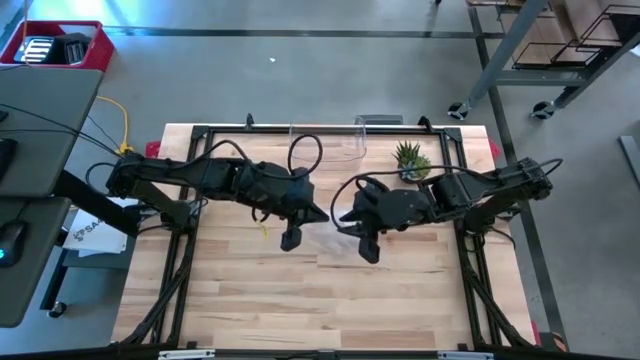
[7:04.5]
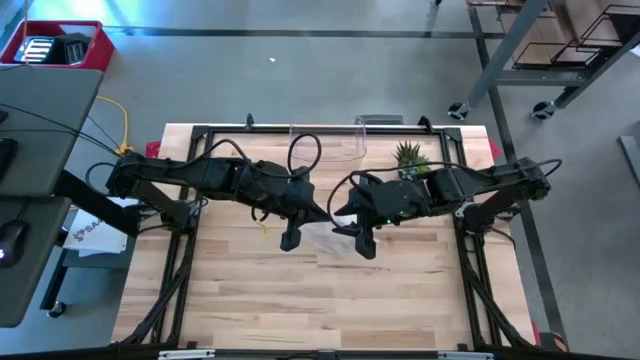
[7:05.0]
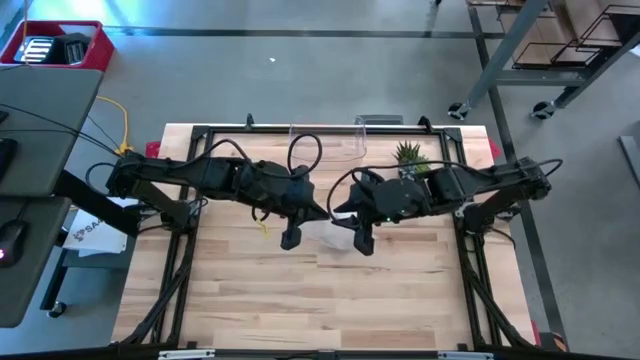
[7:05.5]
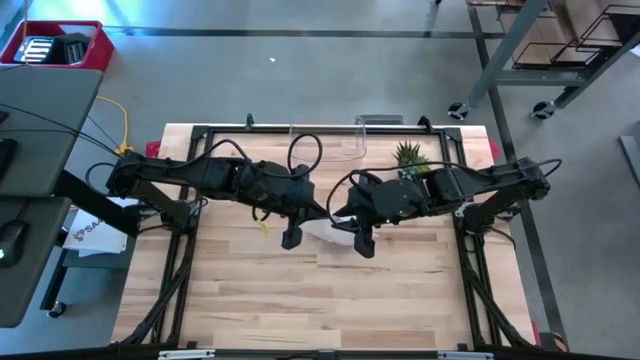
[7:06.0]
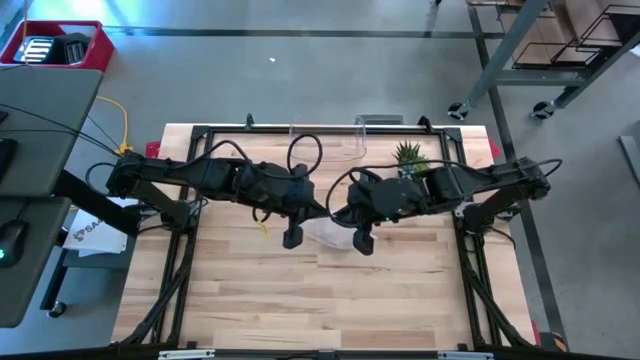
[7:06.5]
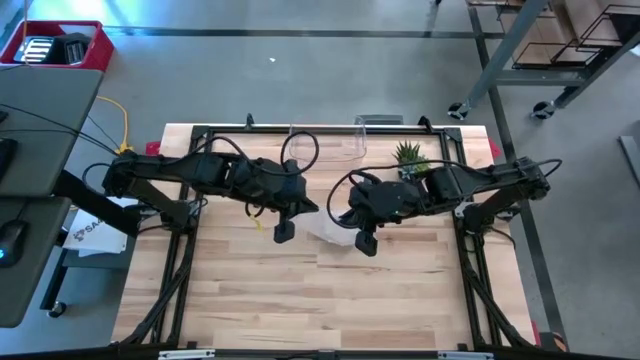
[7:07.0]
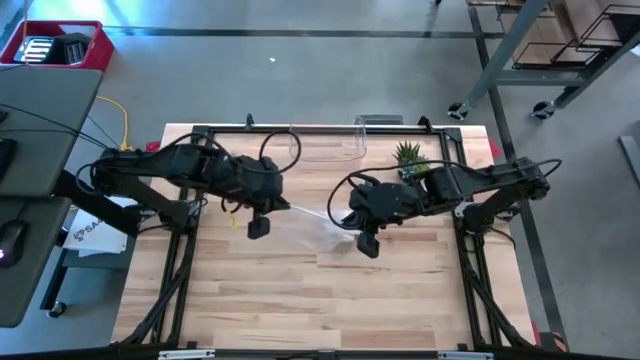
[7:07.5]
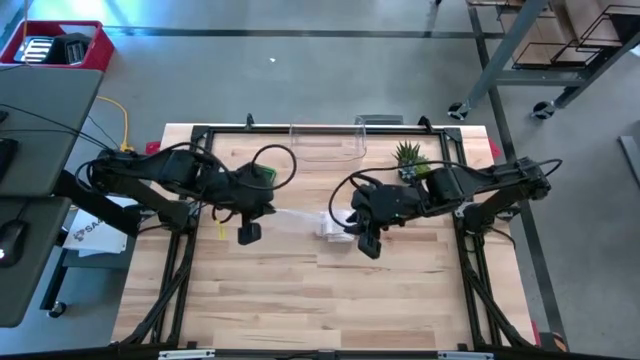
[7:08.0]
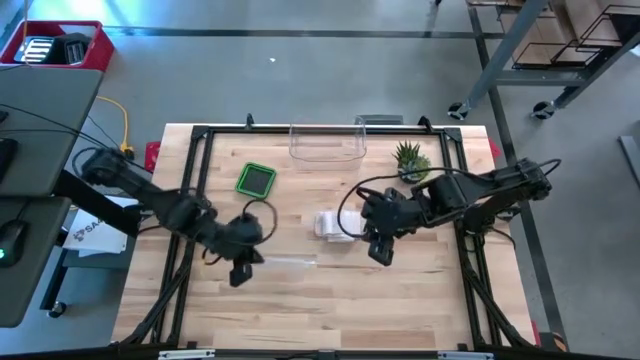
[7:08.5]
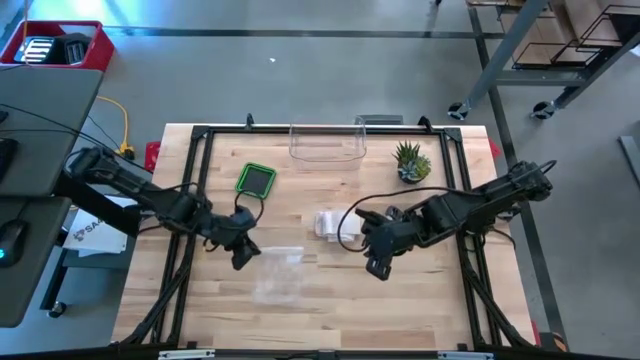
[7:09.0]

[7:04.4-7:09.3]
Task: Roll bandage
Open the transparent zip bag

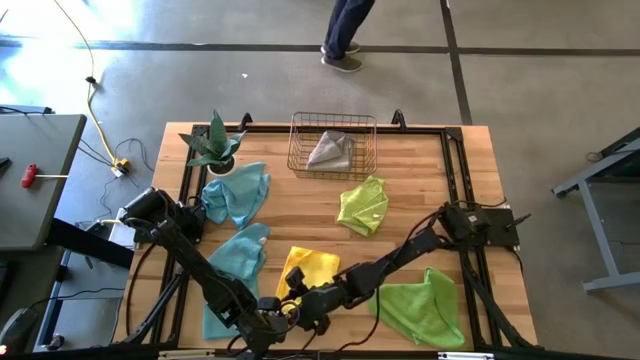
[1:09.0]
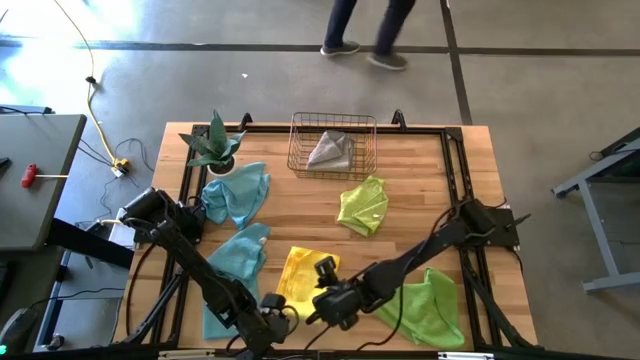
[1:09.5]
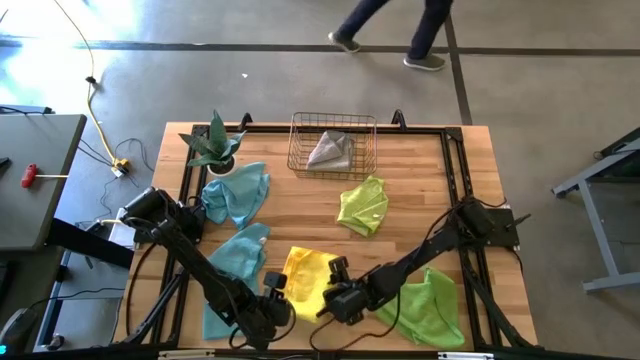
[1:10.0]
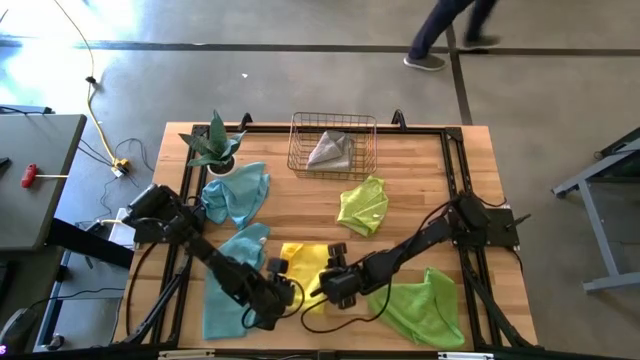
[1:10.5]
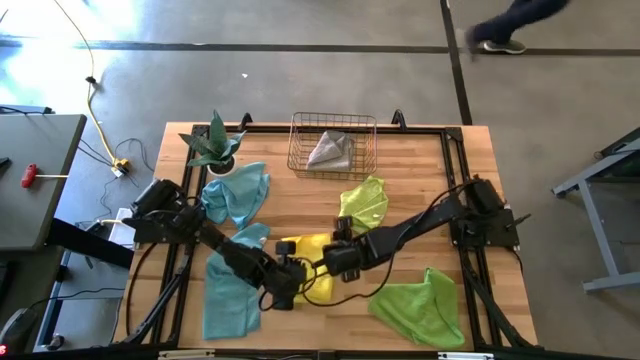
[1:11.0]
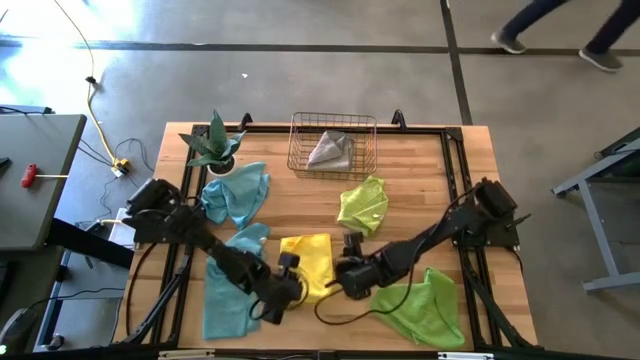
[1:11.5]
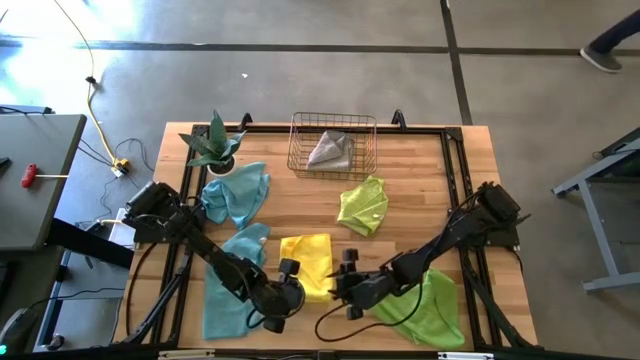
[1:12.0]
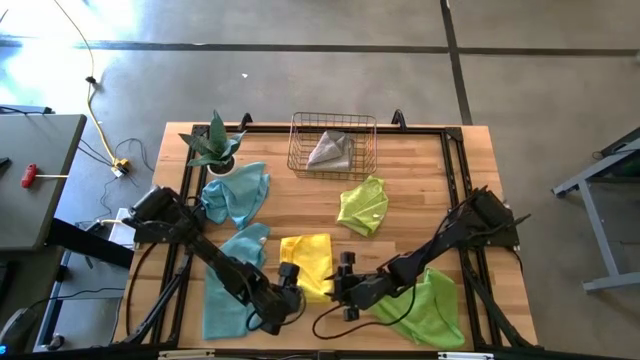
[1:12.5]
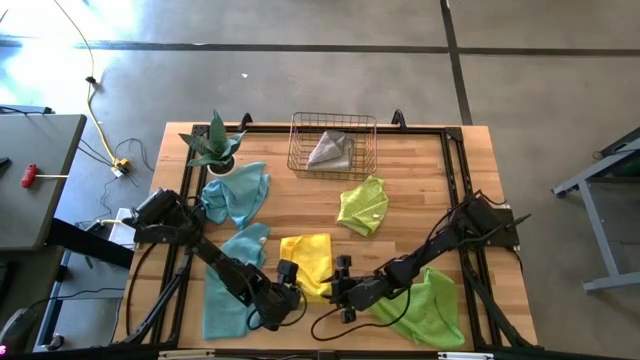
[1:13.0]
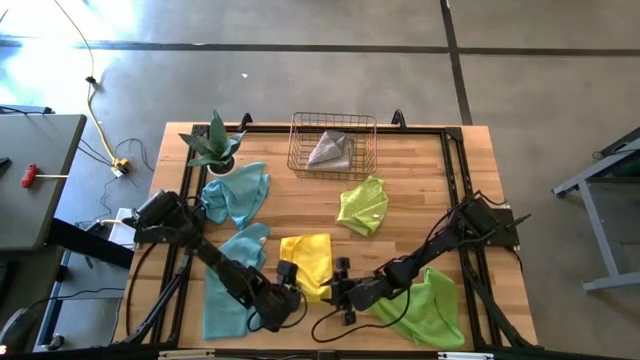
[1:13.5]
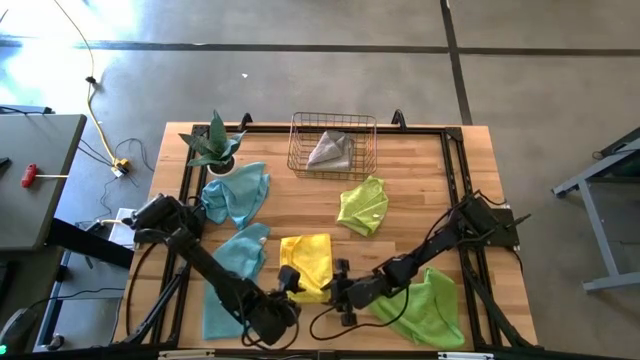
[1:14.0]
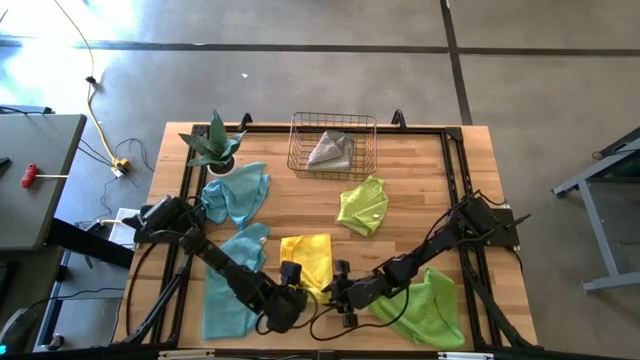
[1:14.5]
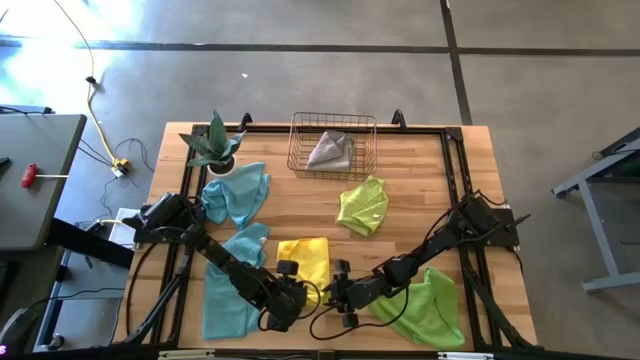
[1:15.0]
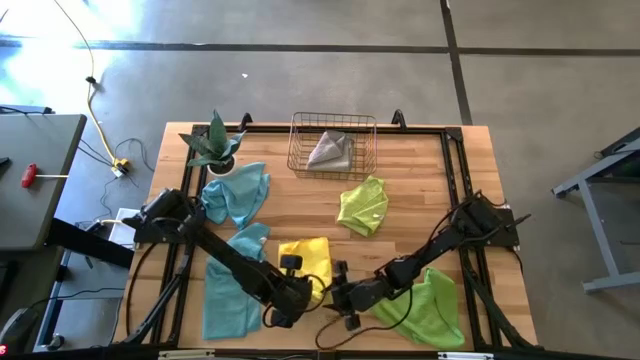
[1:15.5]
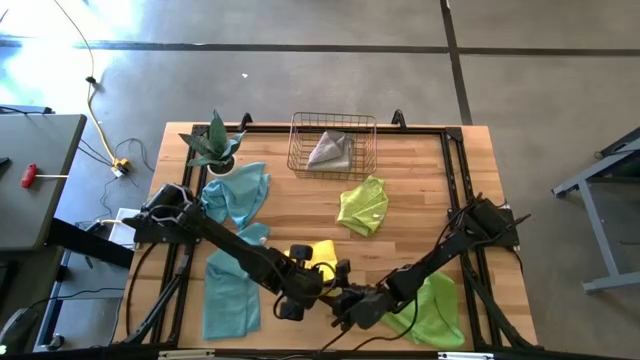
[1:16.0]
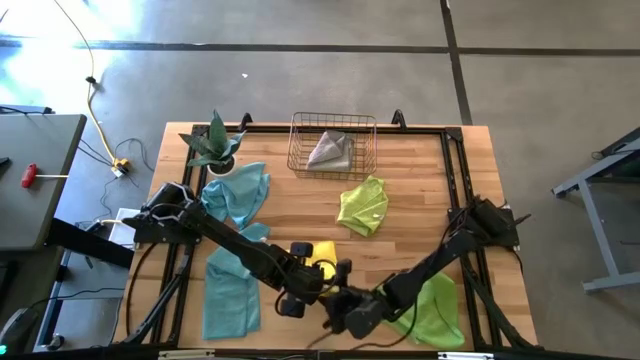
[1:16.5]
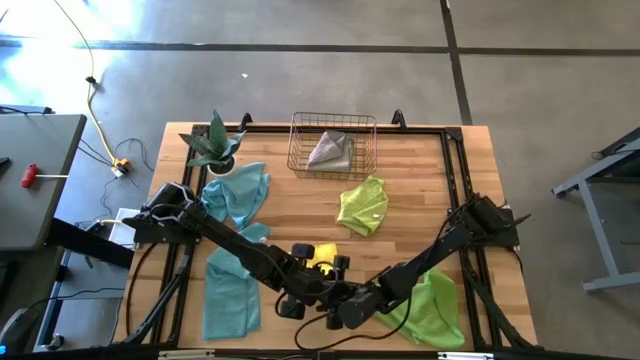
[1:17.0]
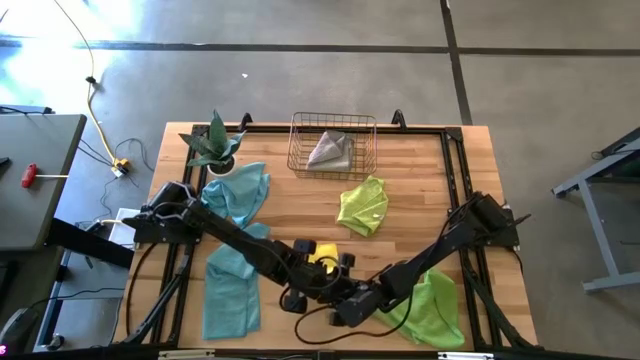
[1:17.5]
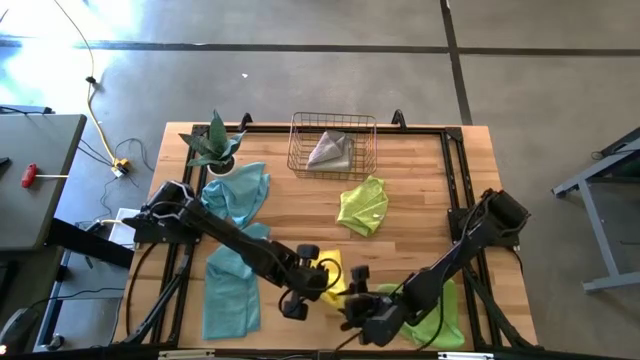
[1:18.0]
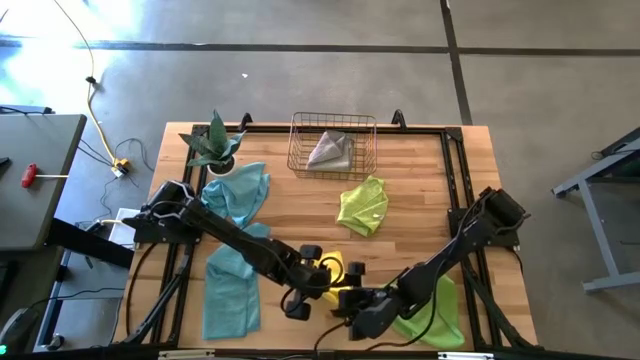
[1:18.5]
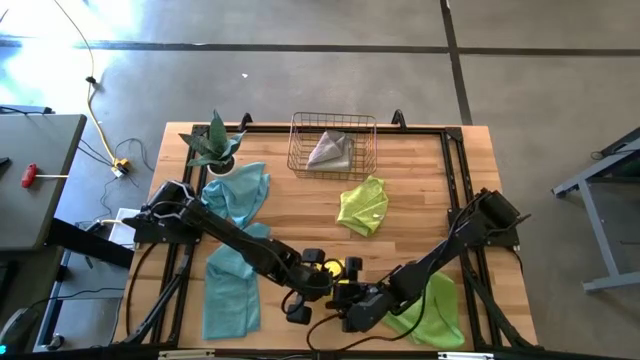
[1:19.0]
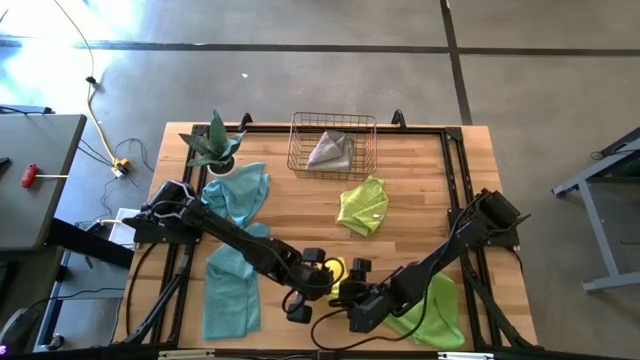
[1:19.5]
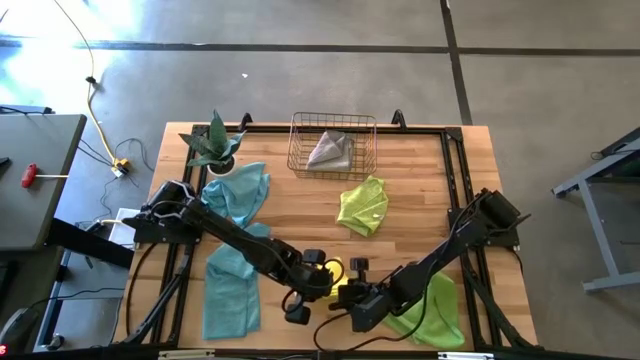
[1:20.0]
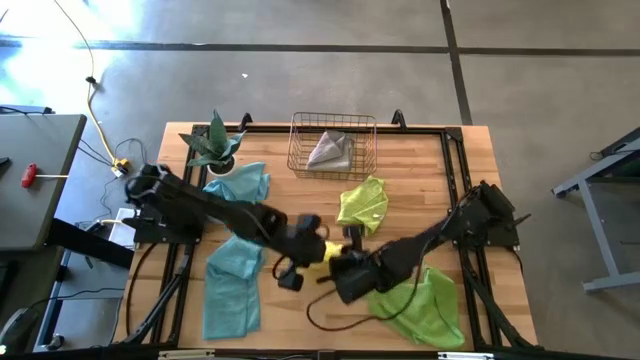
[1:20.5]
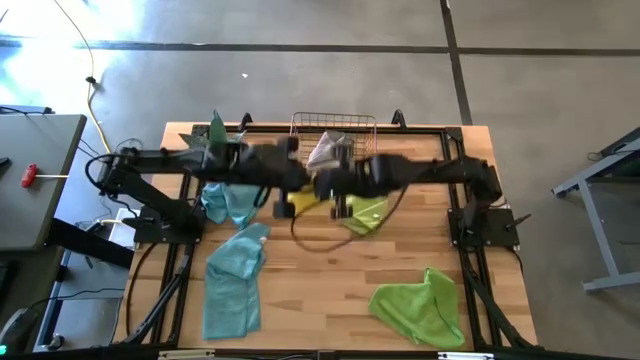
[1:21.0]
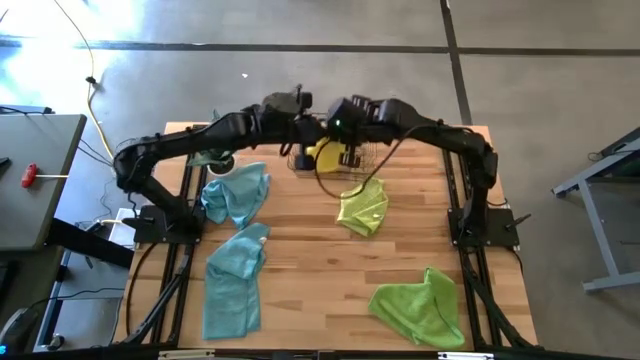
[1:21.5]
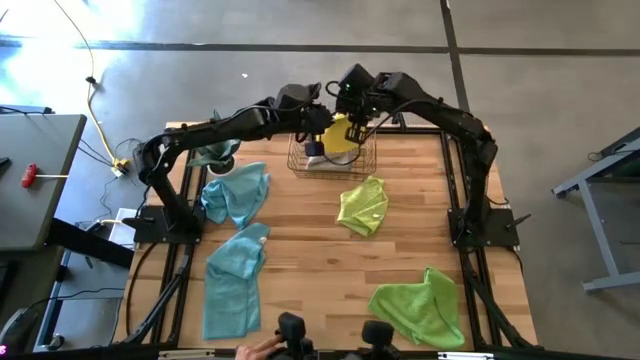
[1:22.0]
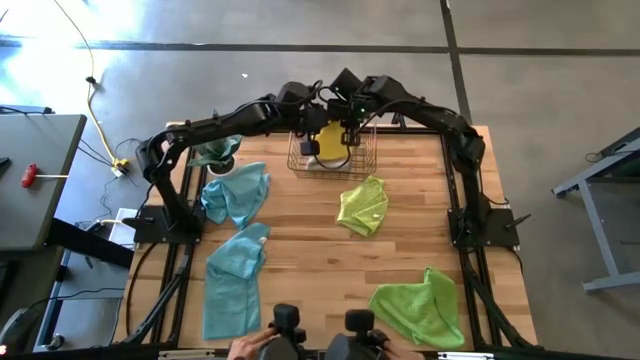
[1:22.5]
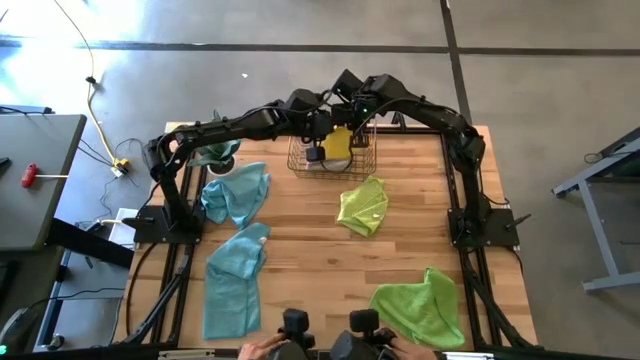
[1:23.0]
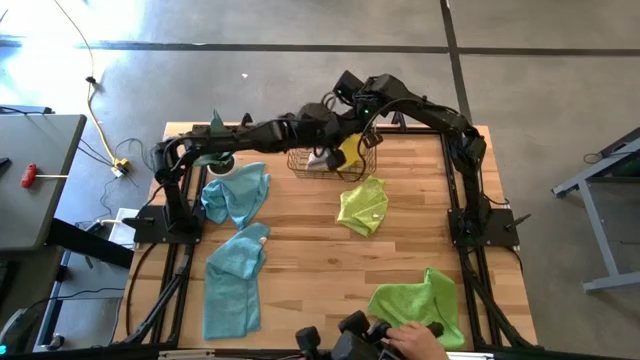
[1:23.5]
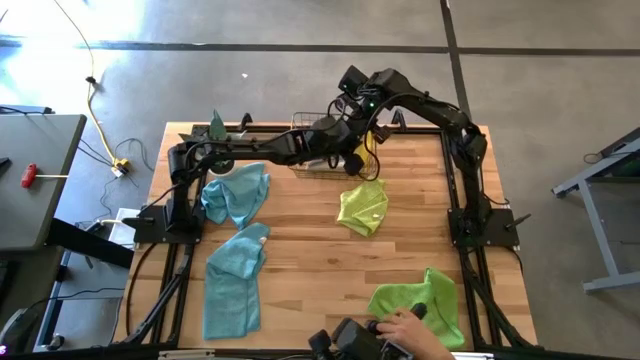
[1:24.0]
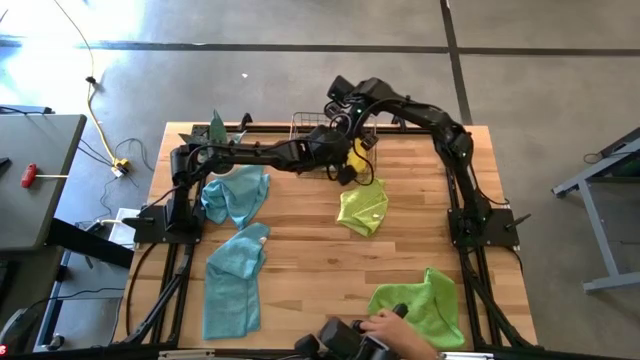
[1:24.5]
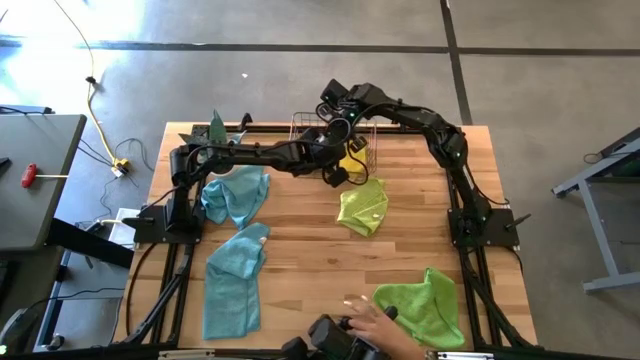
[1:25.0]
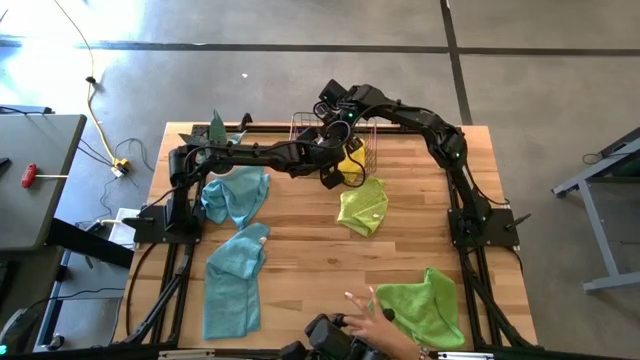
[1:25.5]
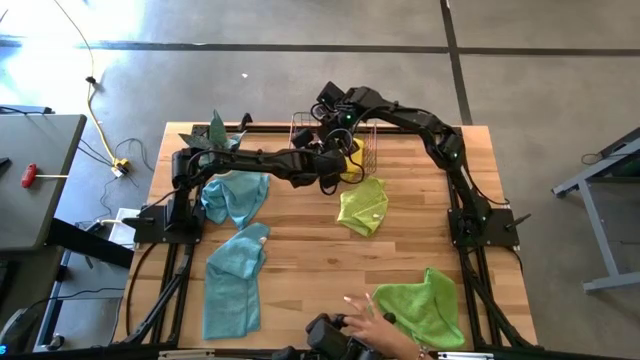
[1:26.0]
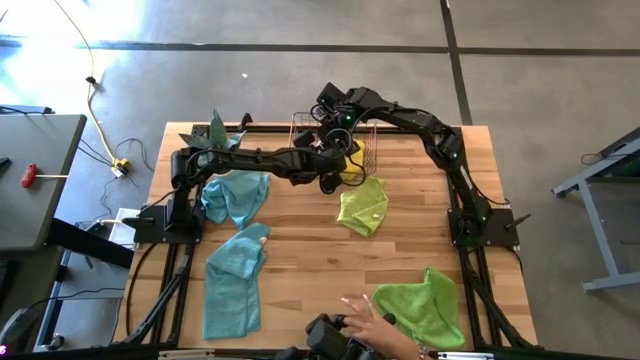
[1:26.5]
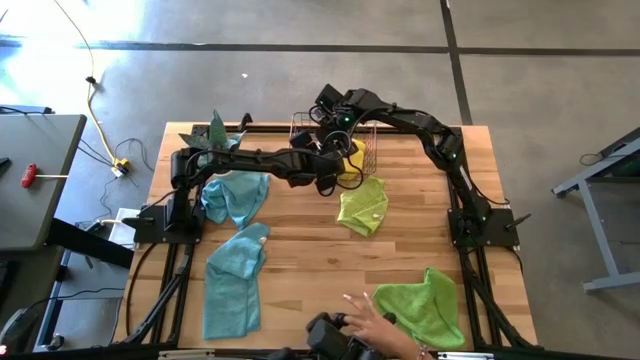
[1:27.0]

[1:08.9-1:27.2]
Task: Fold microfiber towels
Put the yellow microfiber towel into the wire basket
